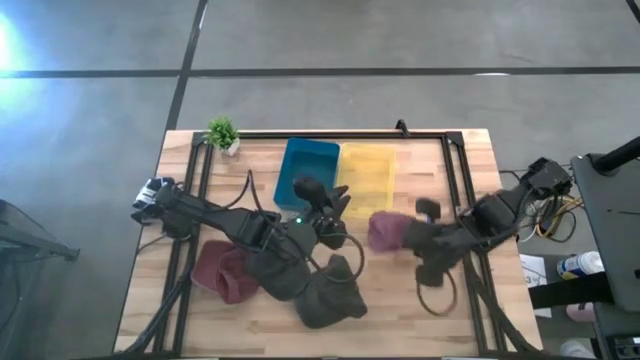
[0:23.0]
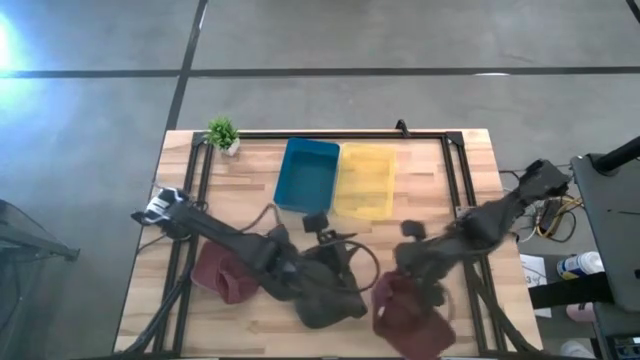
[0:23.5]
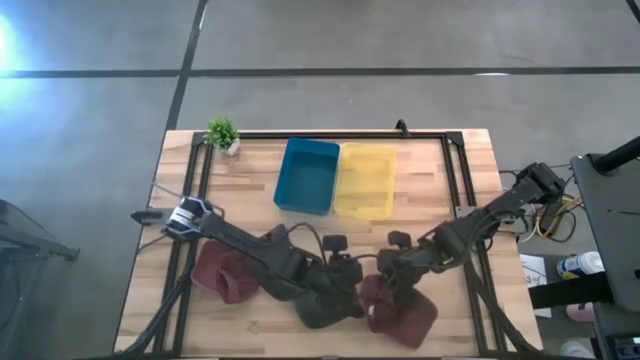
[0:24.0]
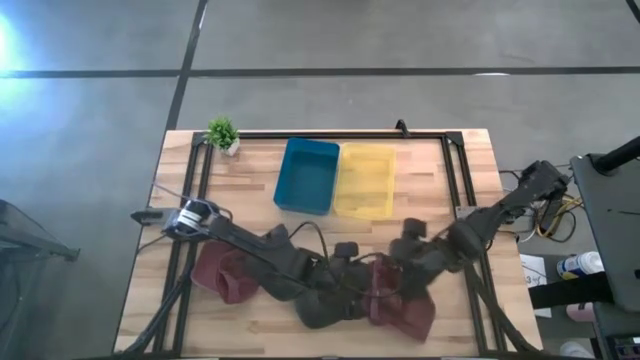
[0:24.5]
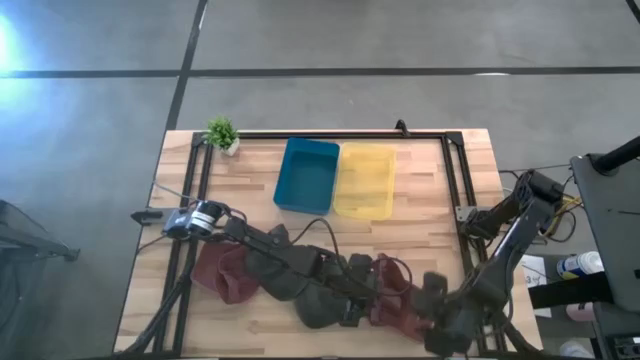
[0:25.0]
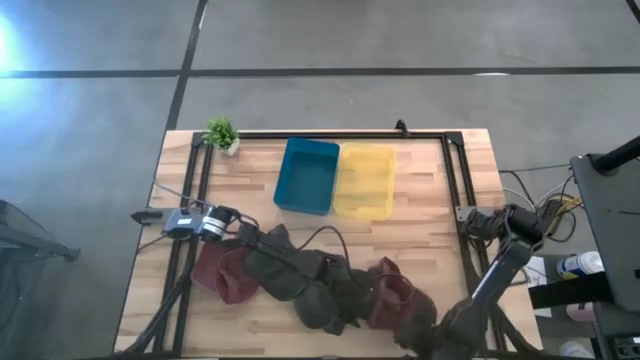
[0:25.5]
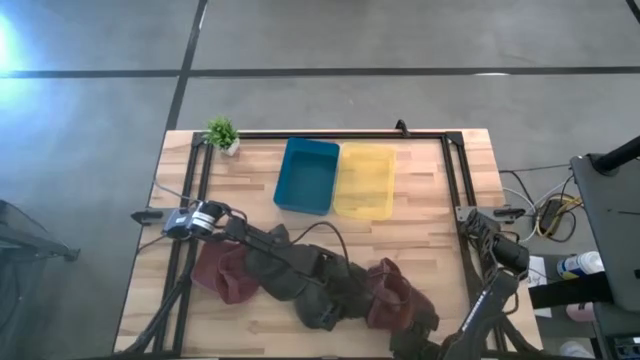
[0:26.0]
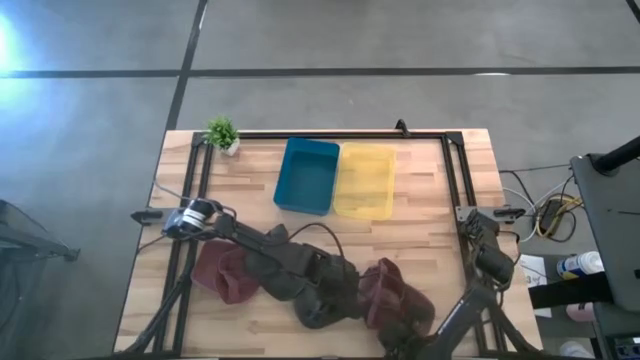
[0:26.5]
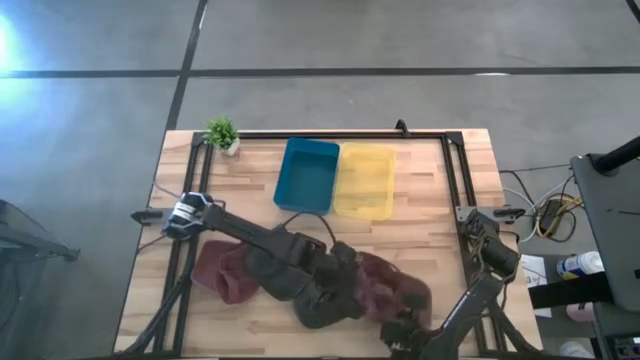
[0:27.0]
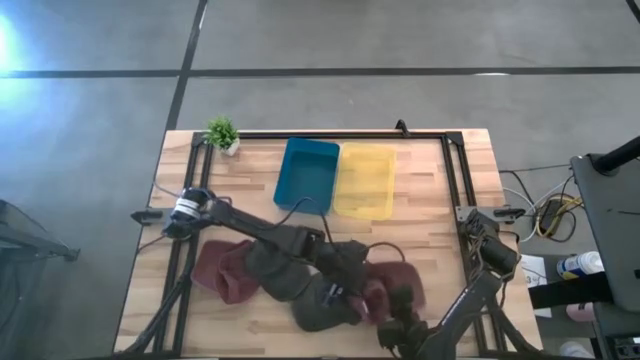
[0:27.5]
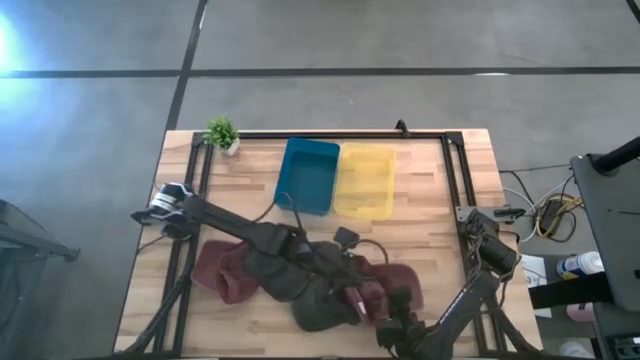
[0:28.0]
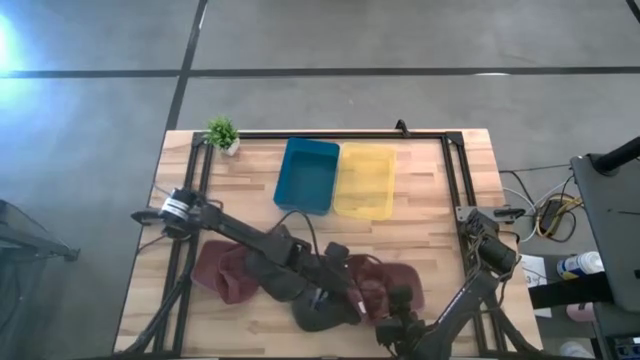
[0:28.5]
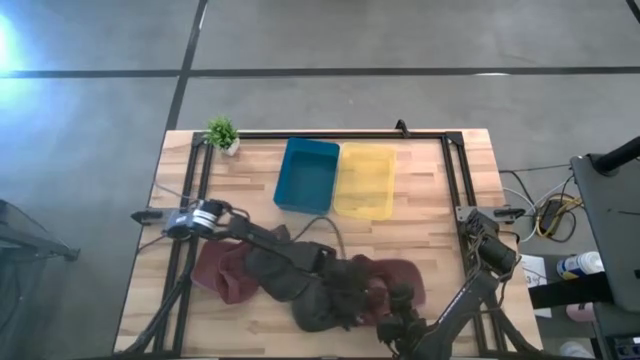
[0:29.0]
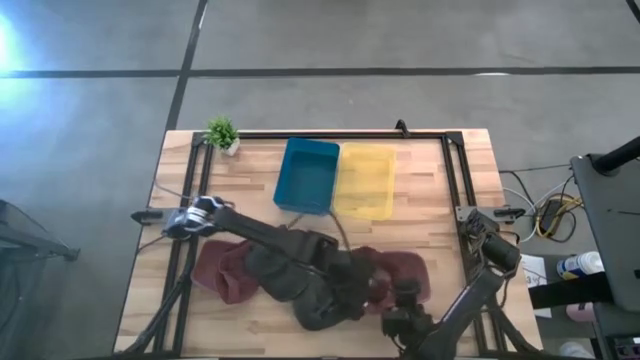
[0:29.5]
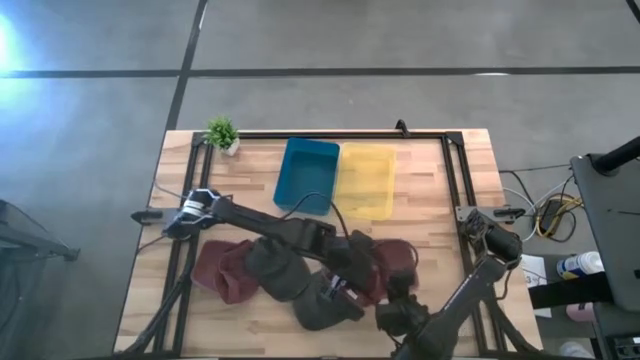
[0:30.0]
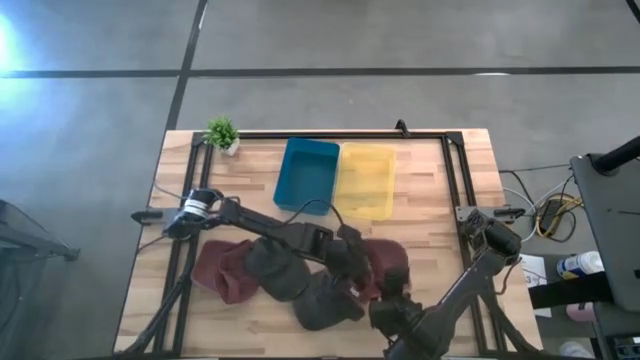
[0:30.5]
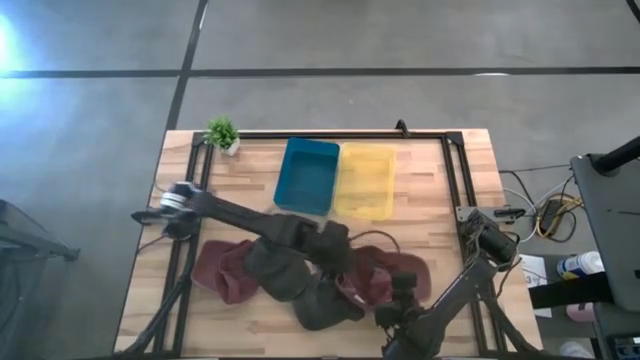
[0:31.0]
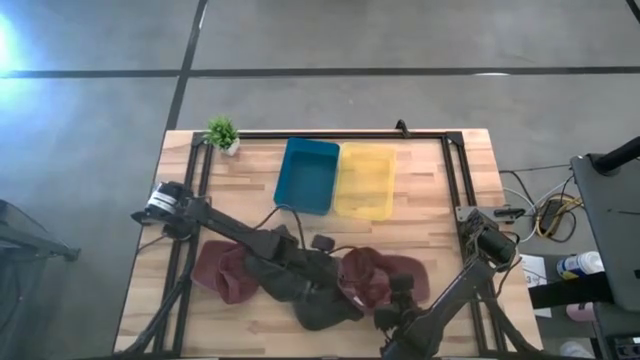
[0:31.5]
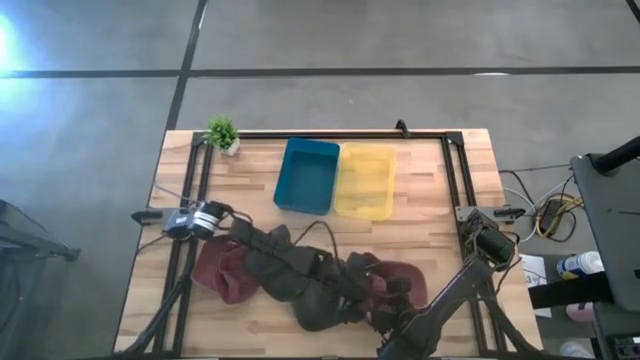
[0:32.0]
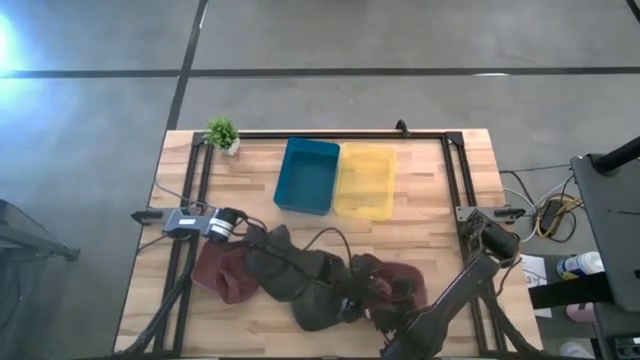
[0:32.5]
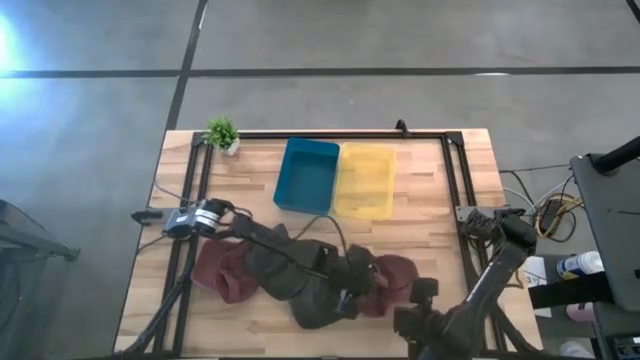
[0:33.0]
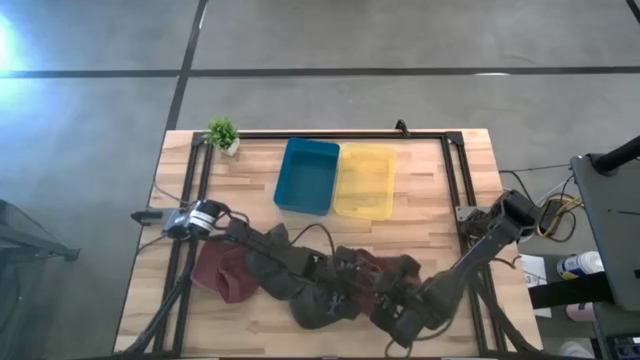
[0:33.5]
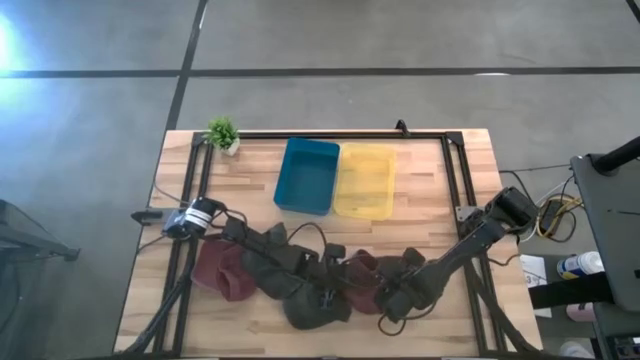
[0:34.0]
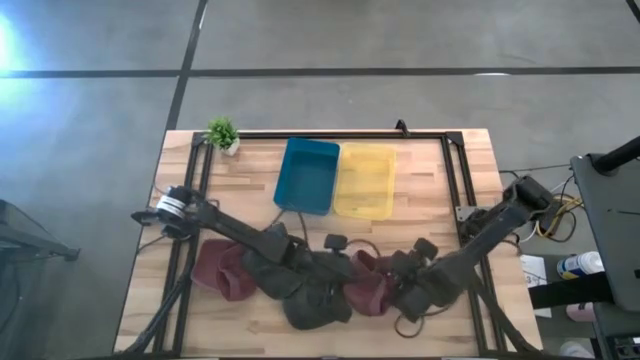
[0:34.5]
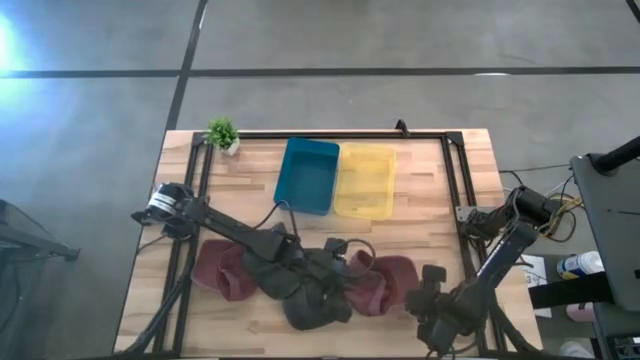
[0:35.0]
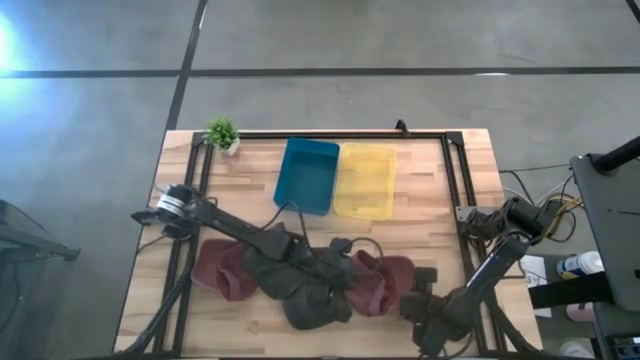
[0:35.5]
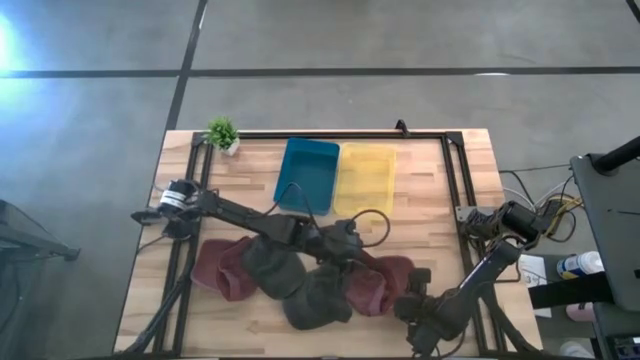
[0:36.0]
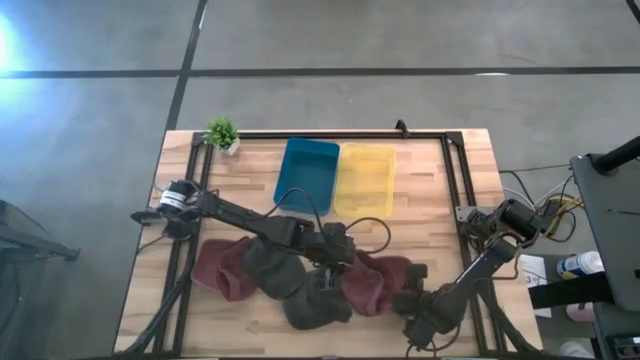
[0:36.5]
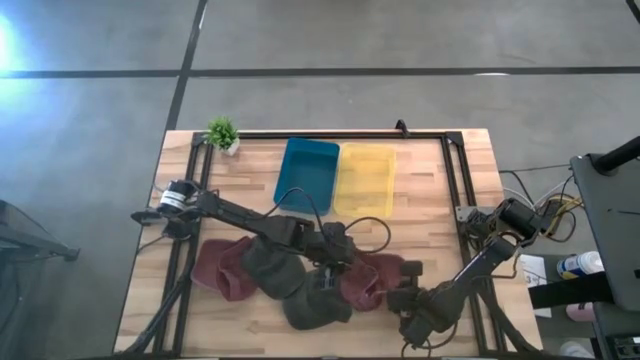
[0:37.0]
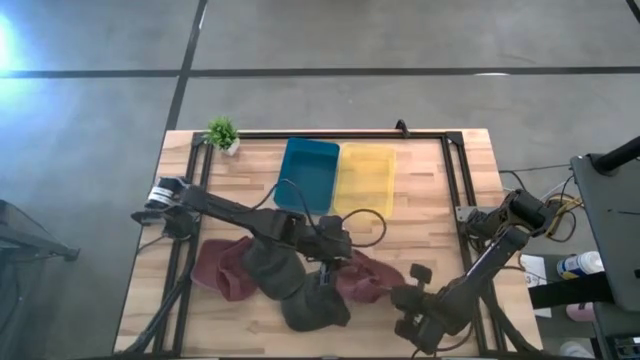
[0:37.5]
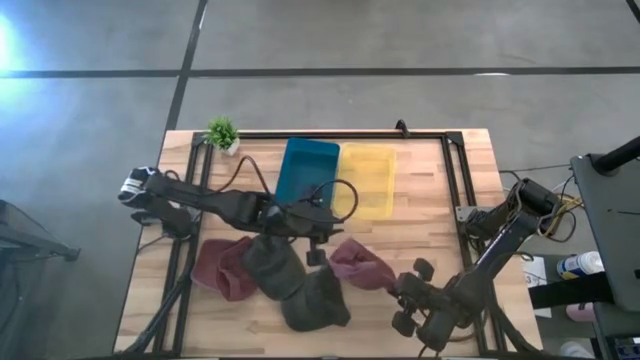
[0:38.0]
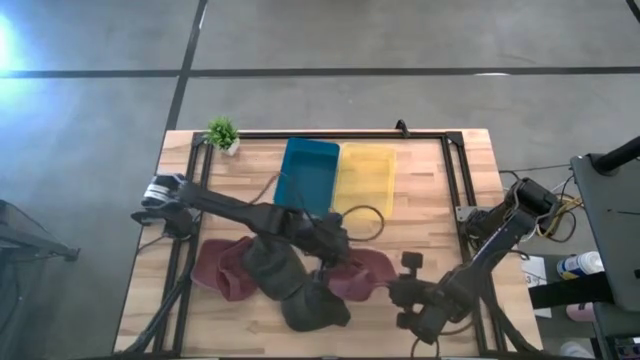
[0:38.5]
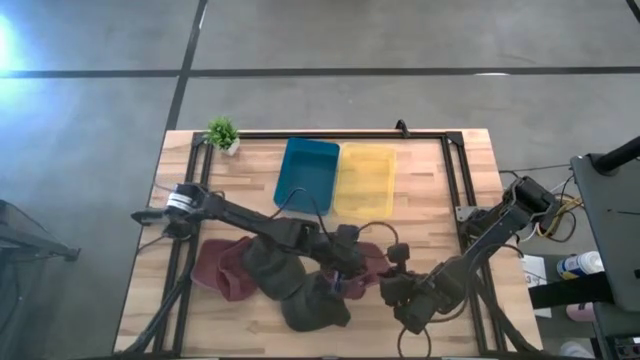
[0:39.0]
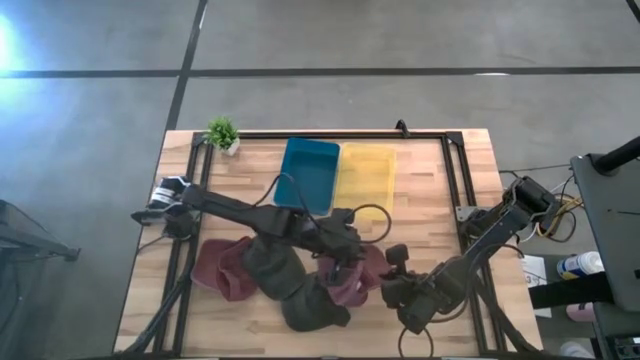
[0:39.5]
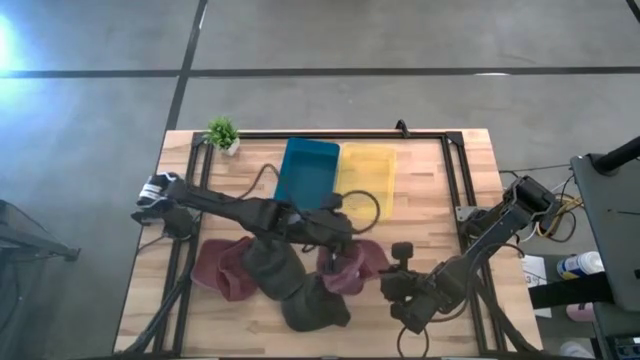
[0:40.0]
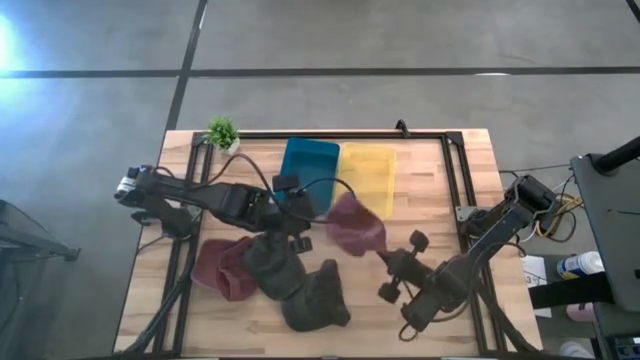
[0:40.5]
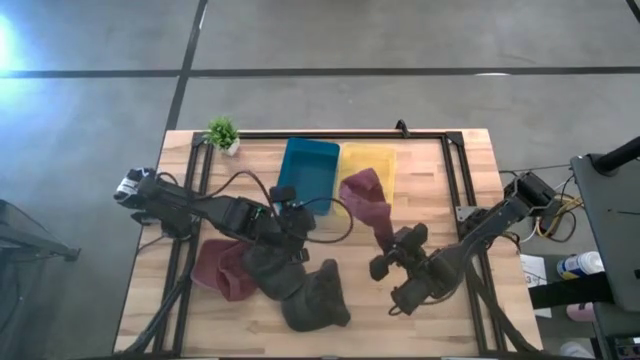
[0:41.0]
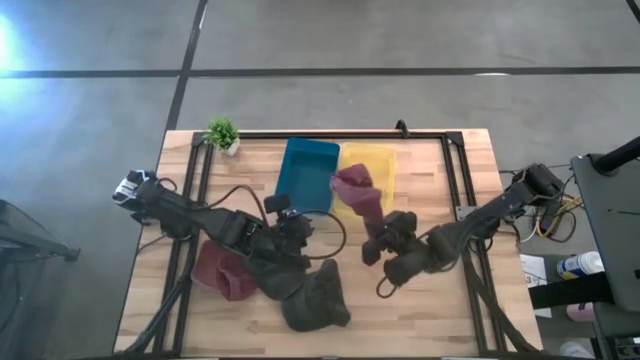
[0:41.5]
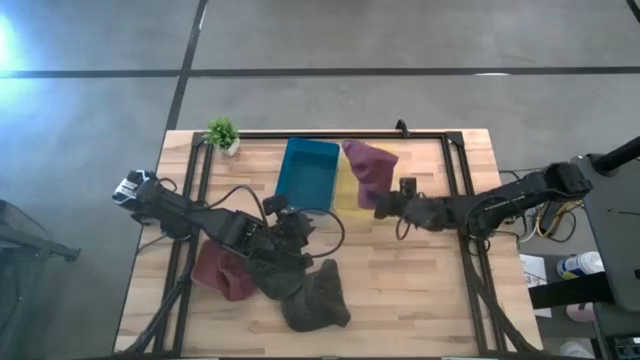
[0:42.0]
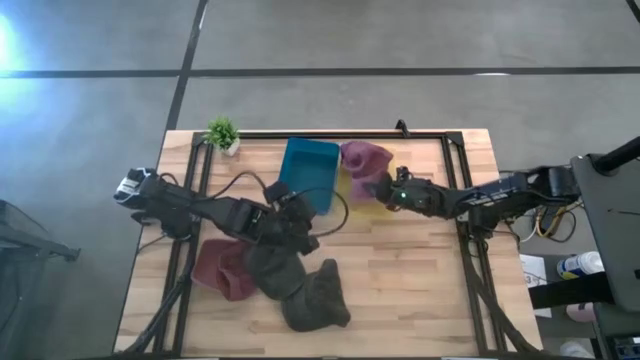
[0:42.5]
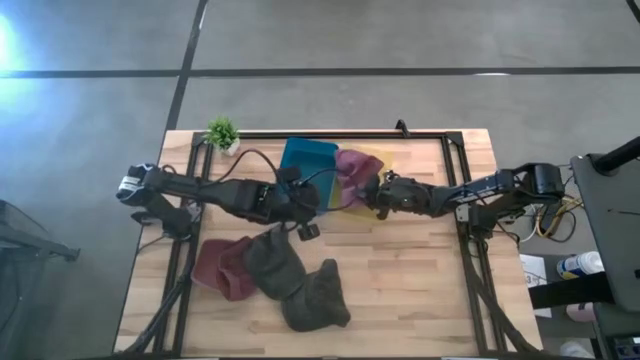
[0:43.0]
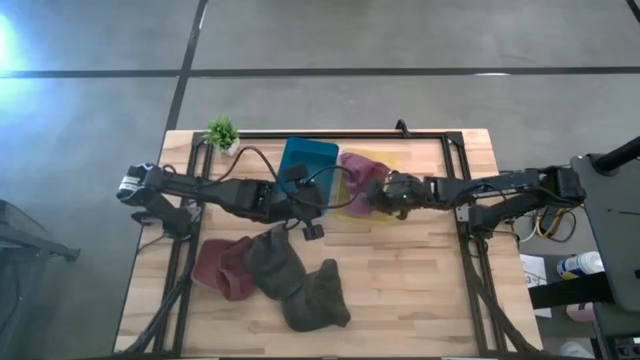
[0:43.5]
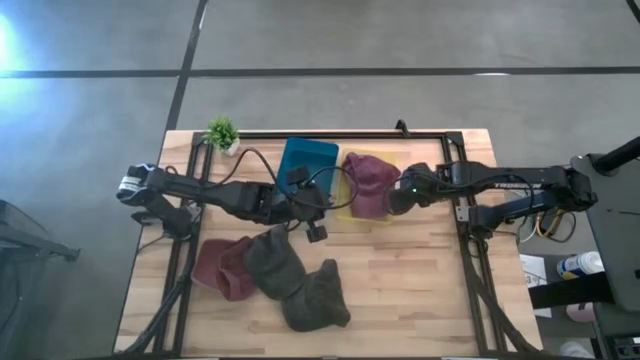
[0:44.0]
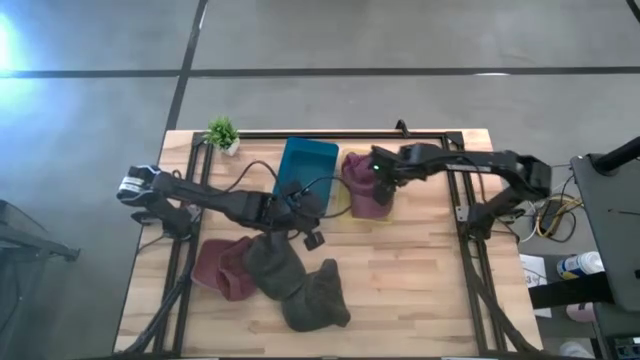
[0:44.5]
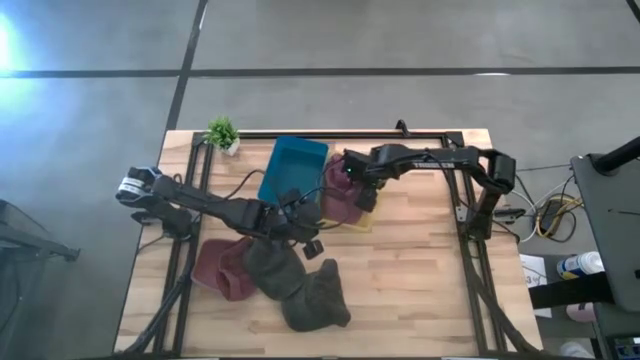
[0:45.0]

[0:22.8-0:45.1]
Task: Pick & Place hat
Put the right red cap into the yellow bin
